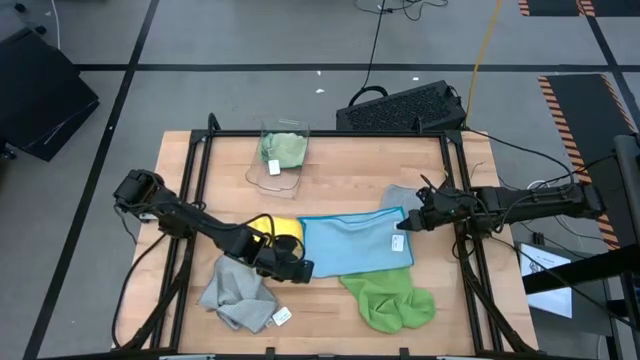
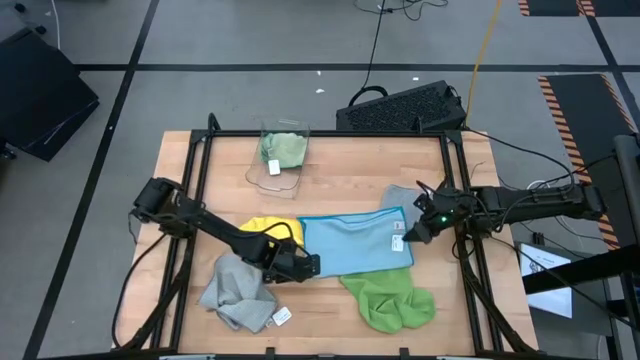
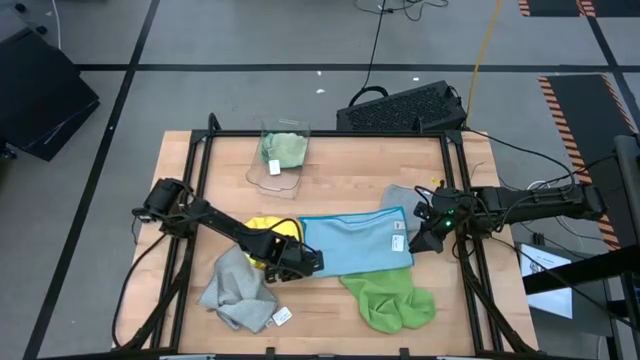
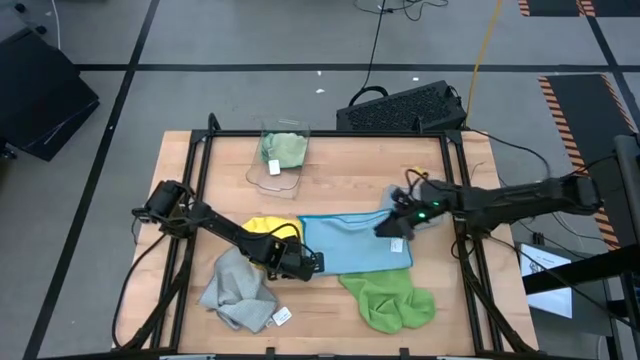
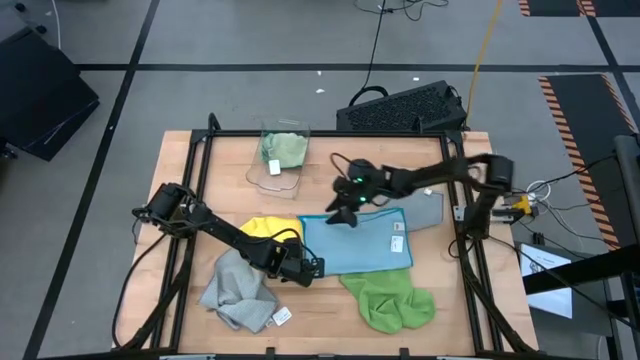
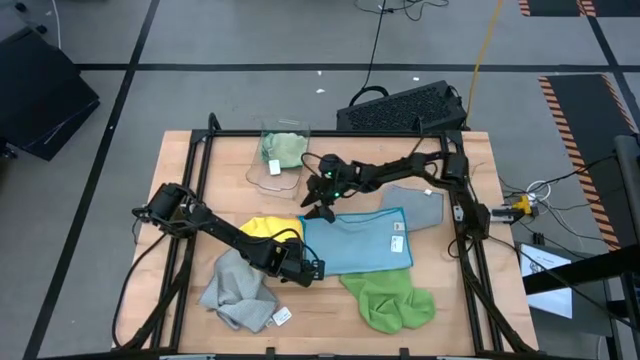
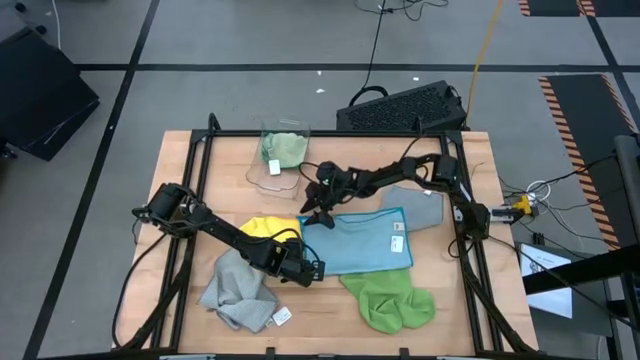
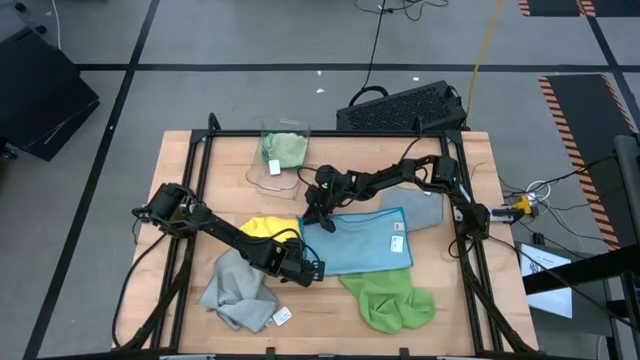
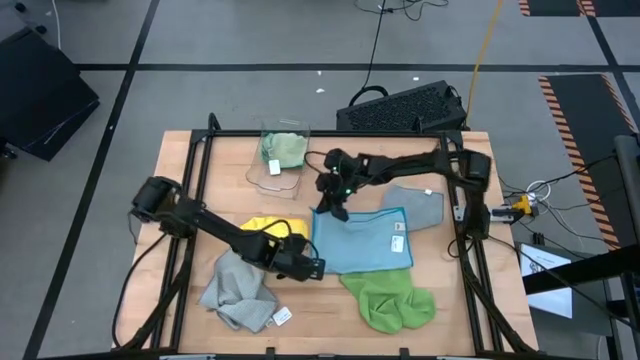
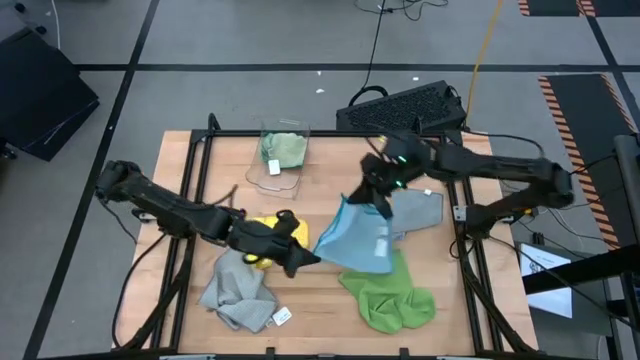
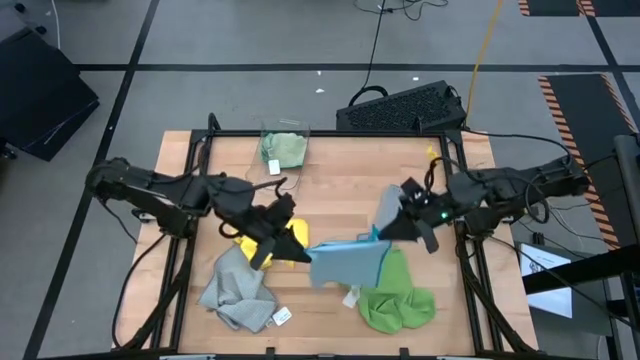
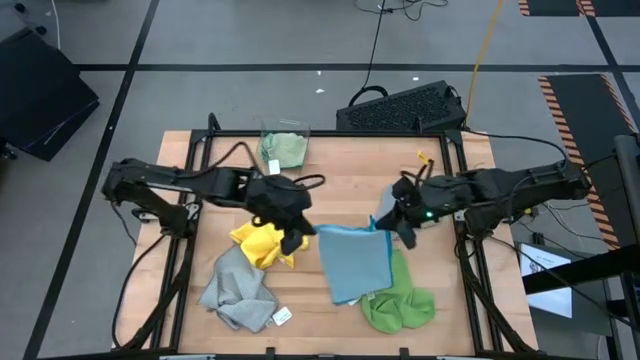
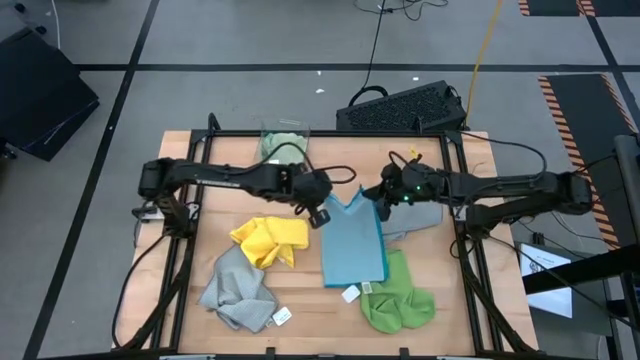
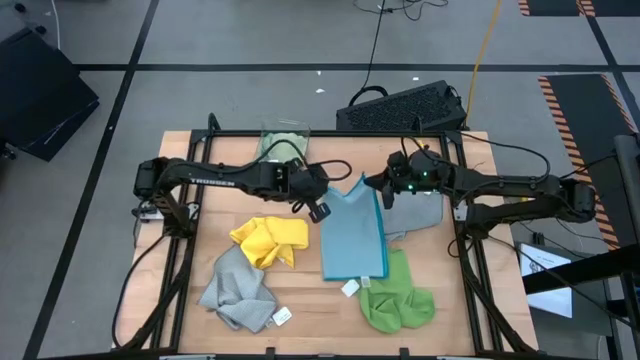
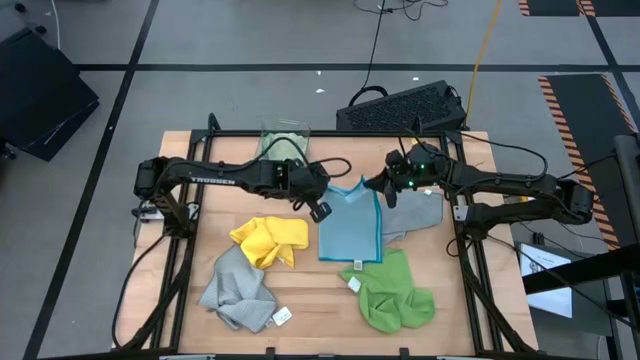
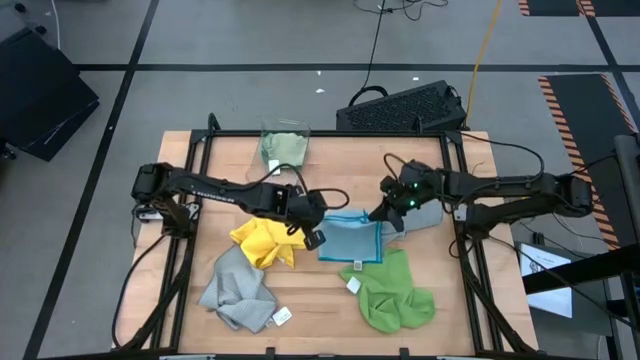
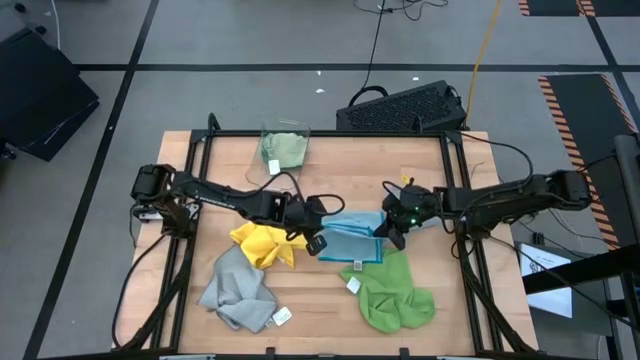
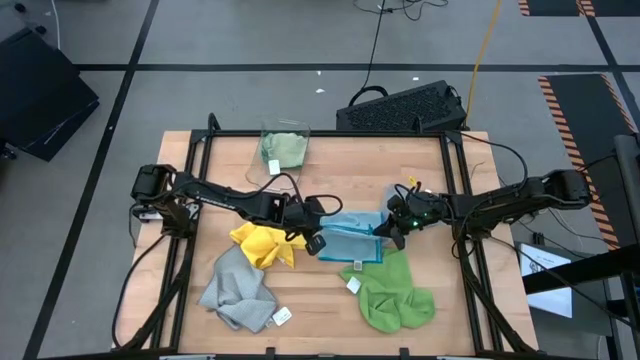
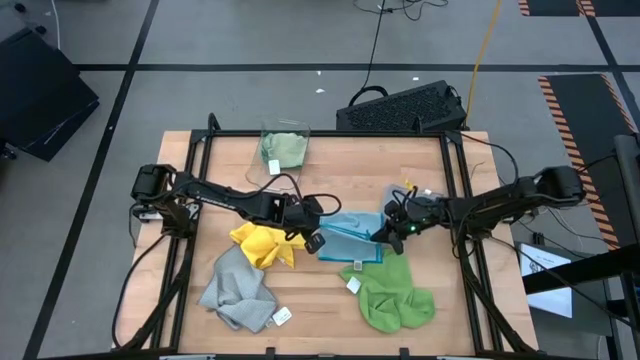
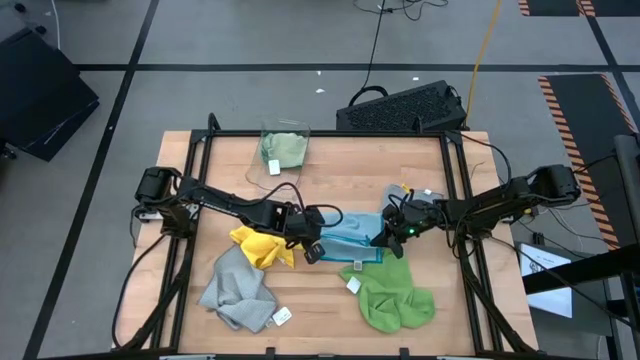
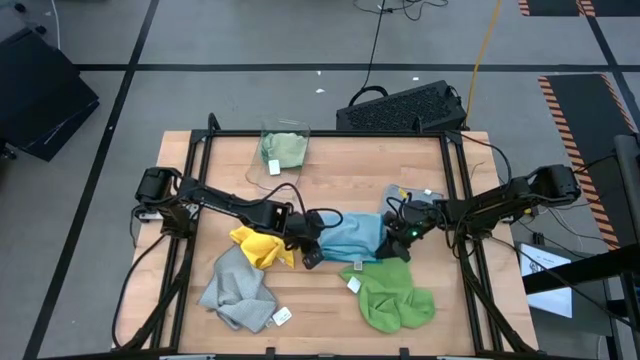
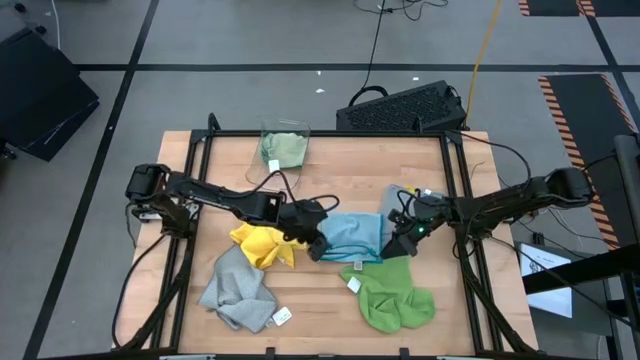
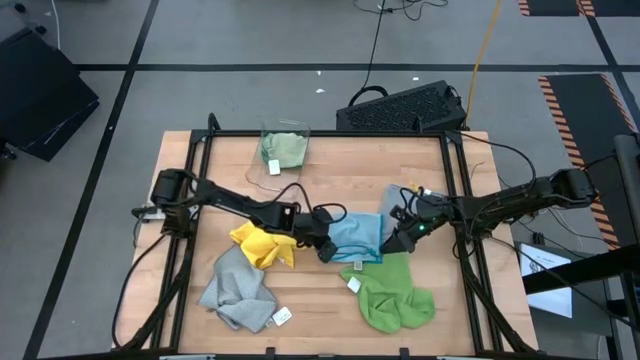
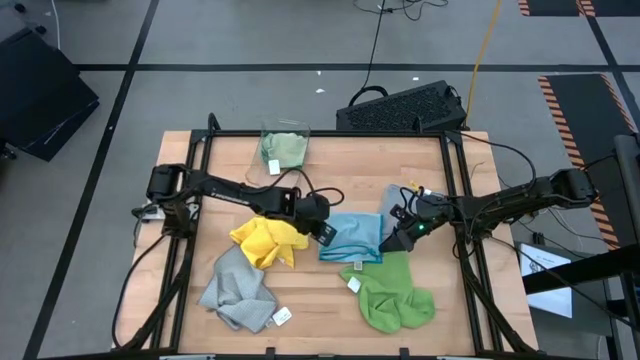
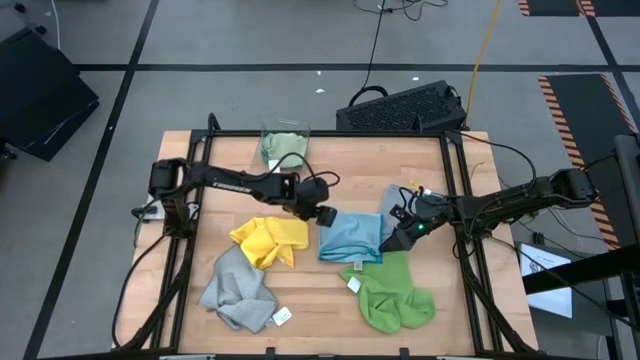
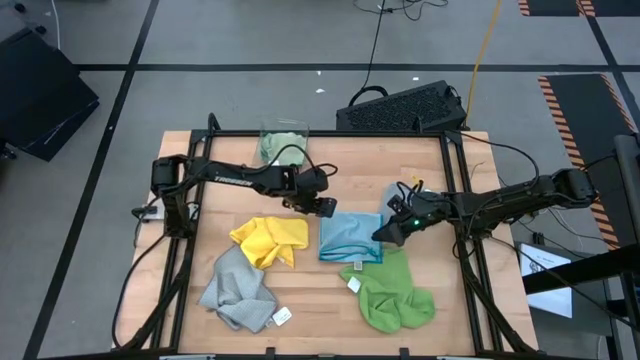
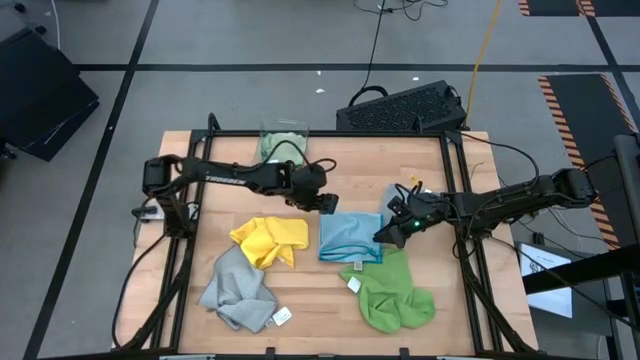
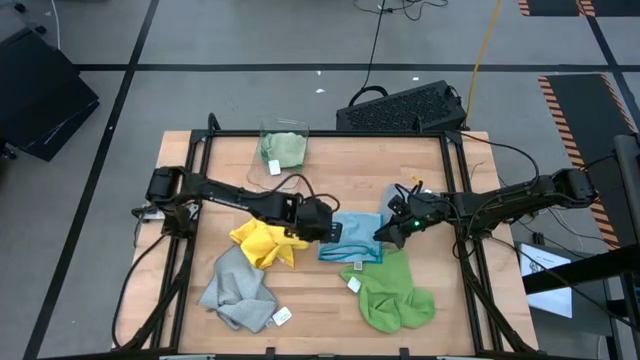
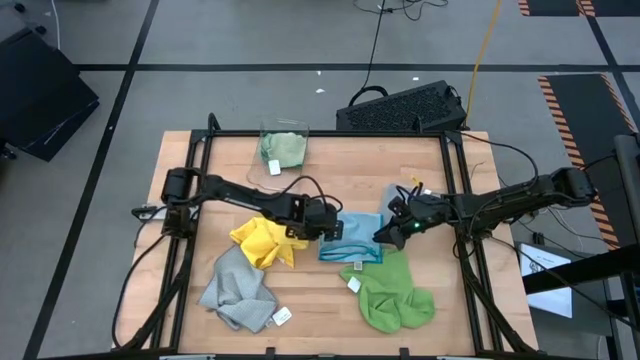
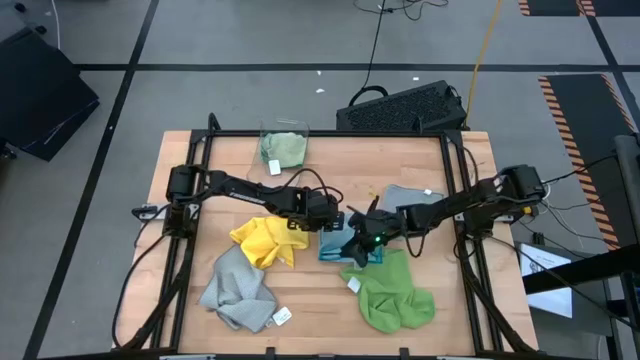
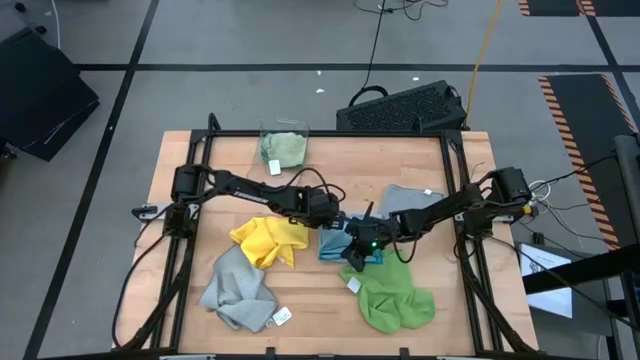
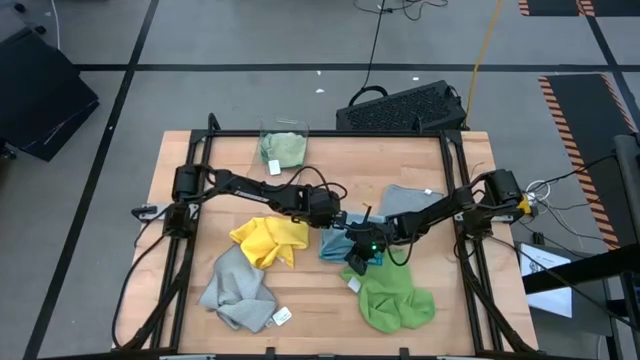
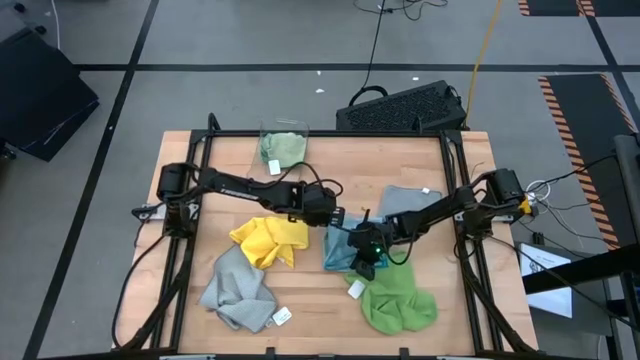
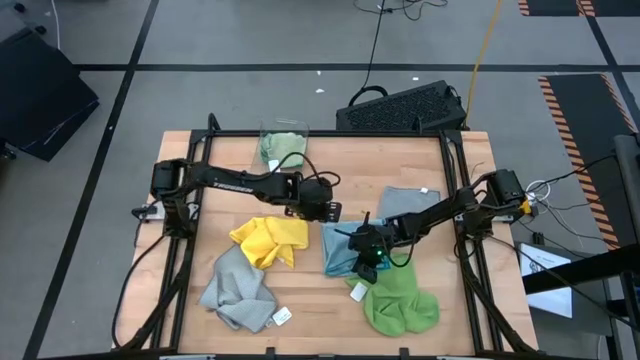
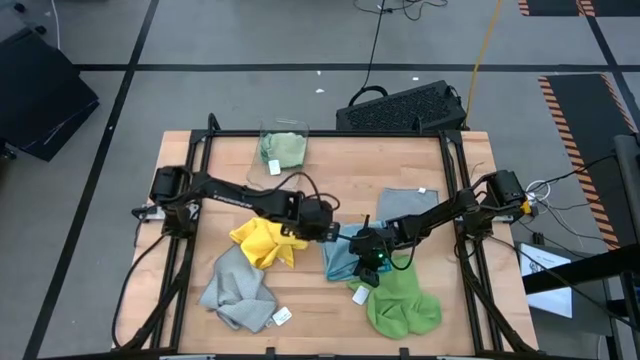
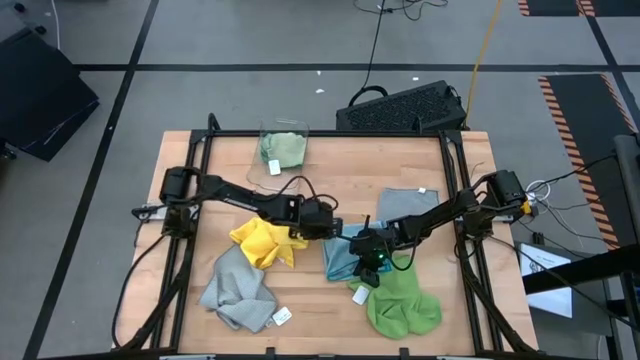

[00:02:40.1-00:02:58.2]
Task: Fold microfiber towels
Fold the blue microfiber cloth

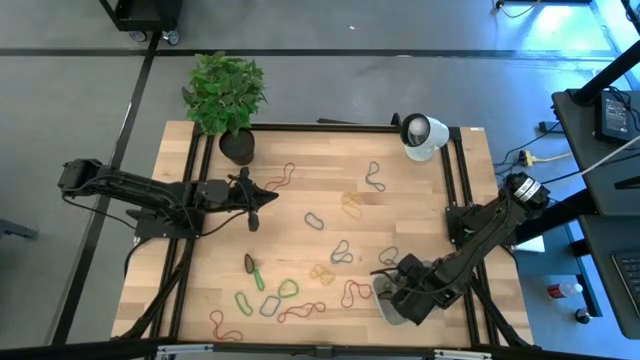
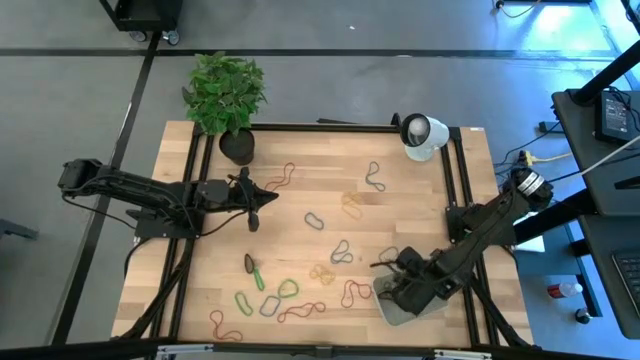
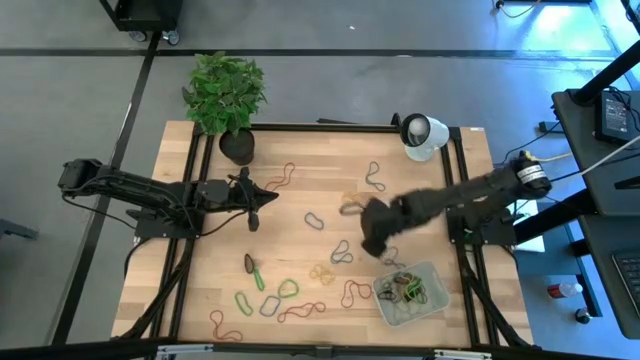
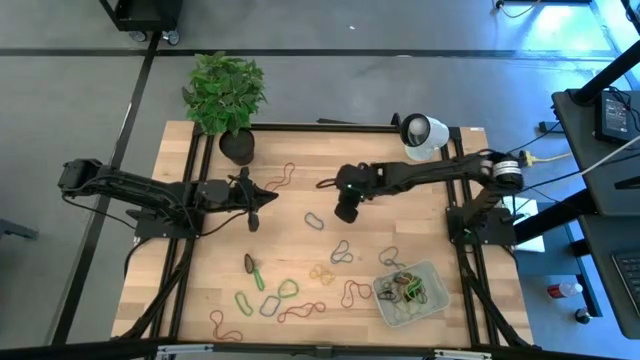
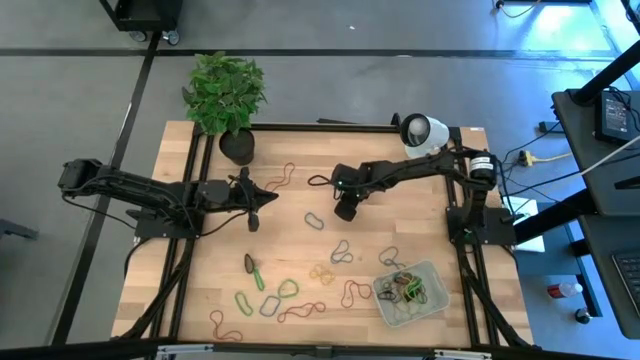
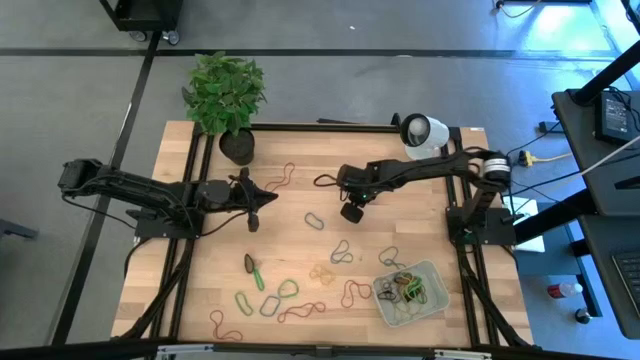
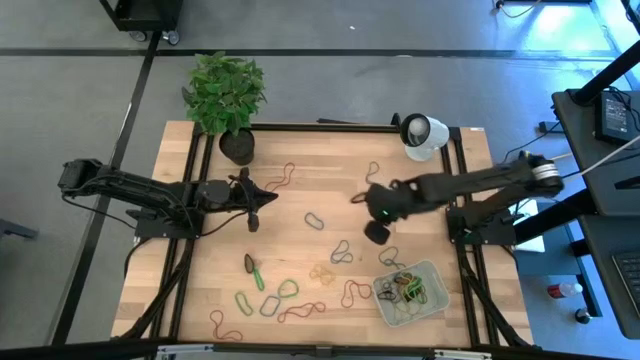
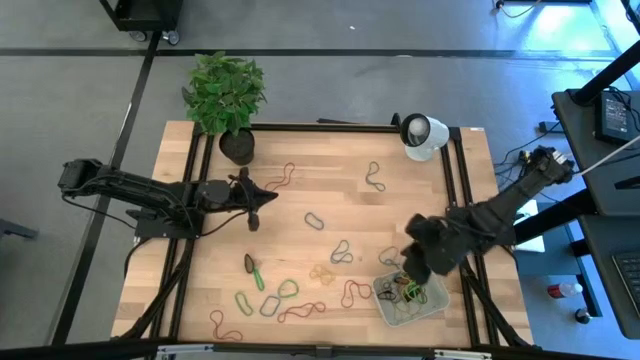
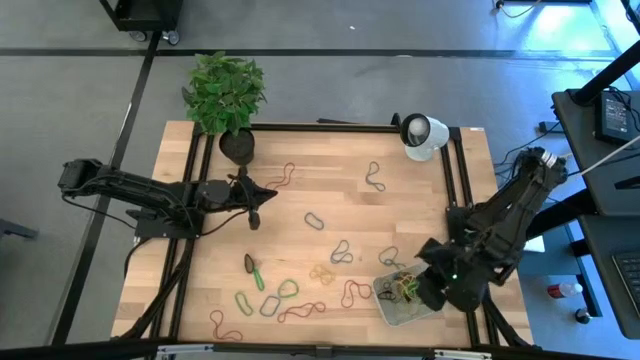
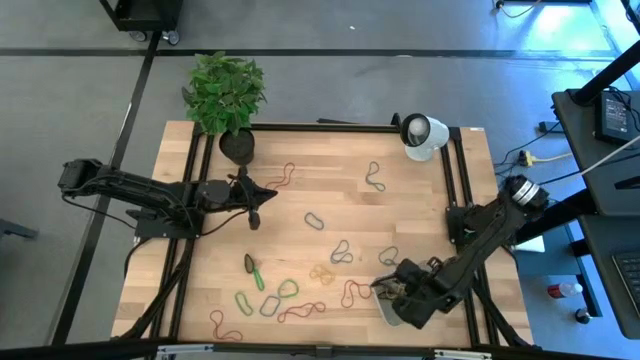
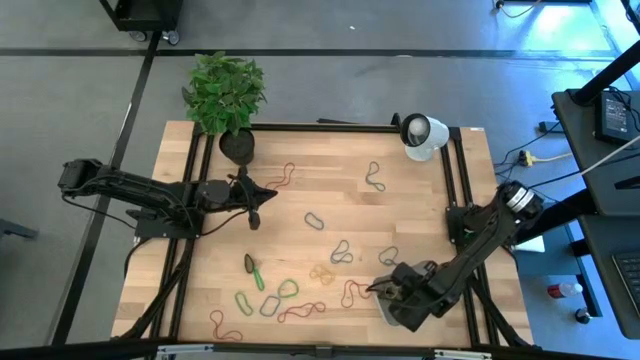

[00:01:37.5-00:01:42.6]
Task: Pick and place rubber bands into bin
Put the yellow rubber band into the white bin
